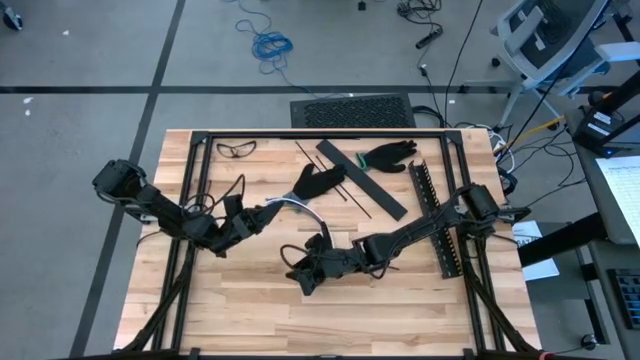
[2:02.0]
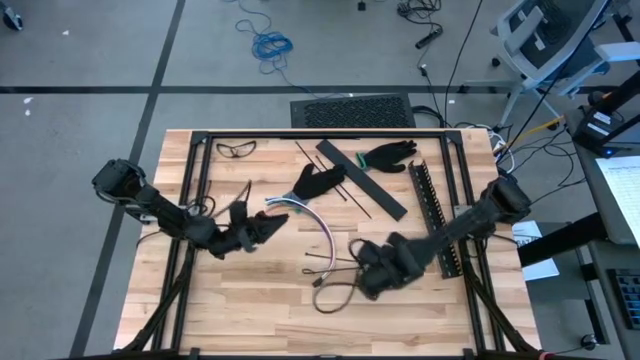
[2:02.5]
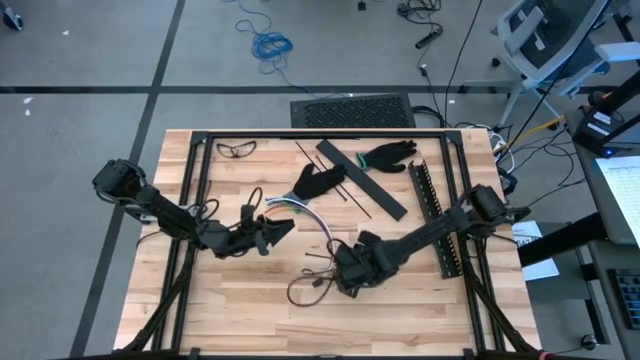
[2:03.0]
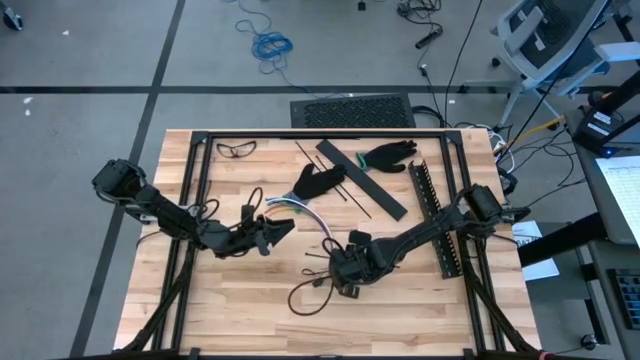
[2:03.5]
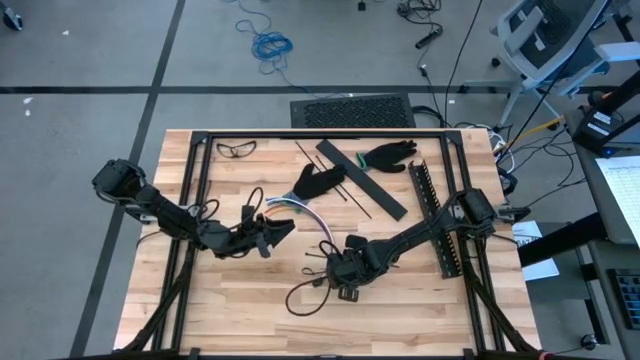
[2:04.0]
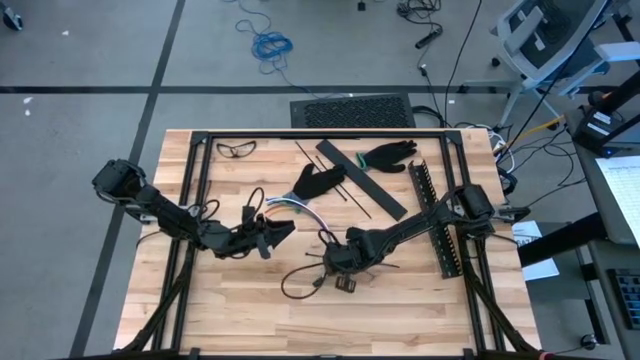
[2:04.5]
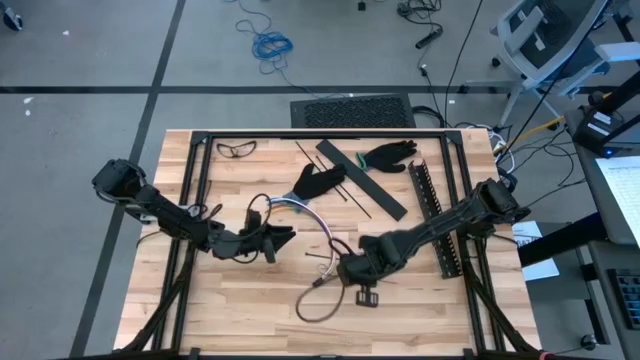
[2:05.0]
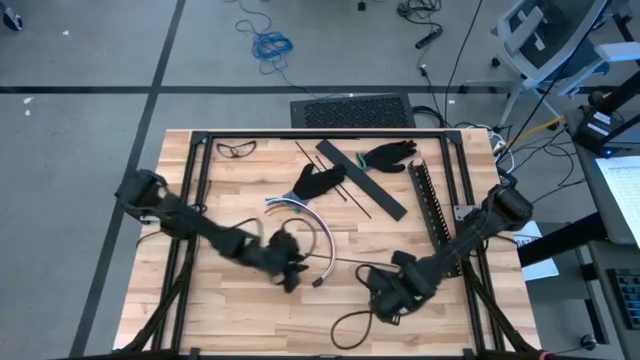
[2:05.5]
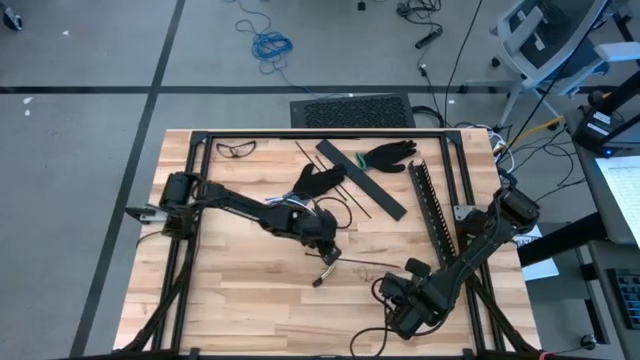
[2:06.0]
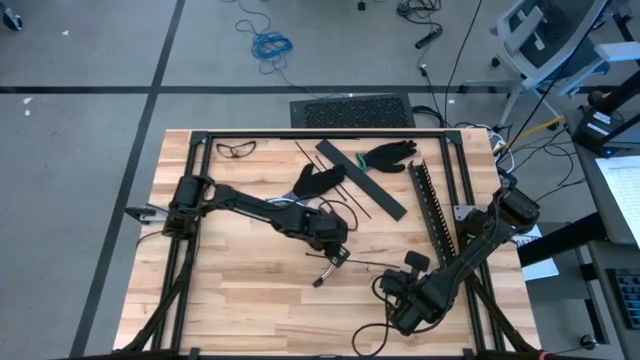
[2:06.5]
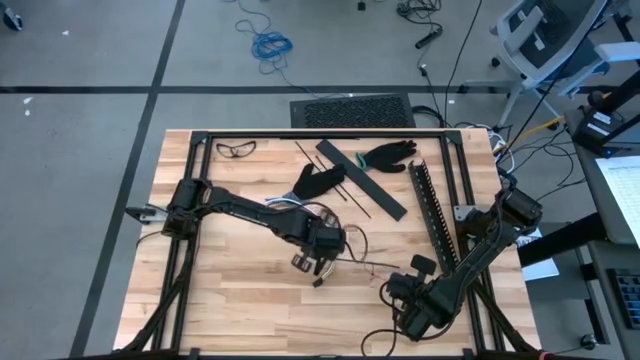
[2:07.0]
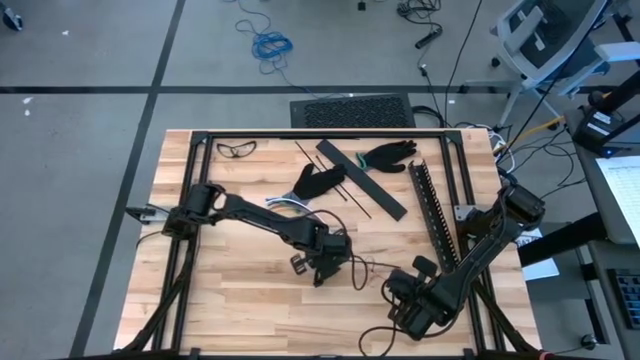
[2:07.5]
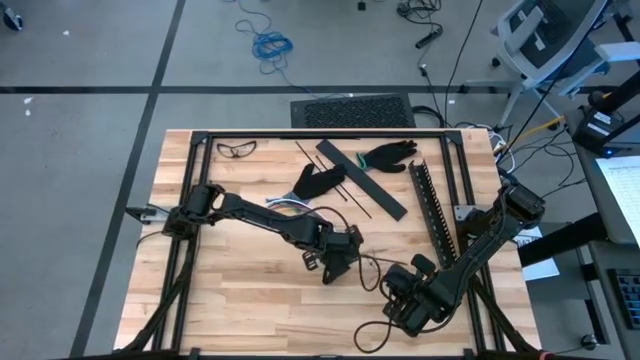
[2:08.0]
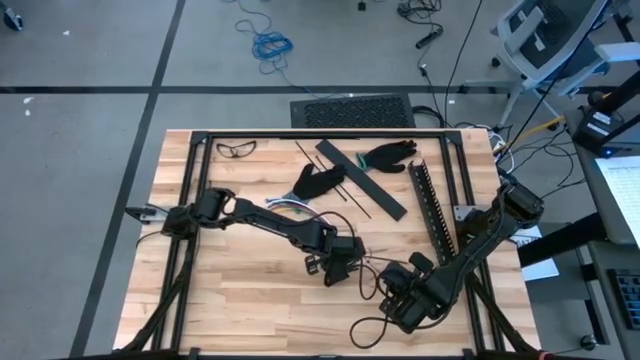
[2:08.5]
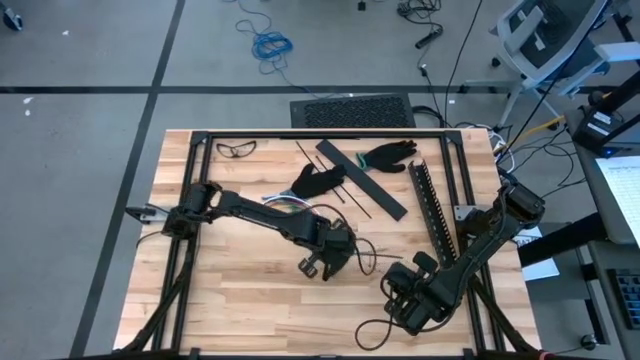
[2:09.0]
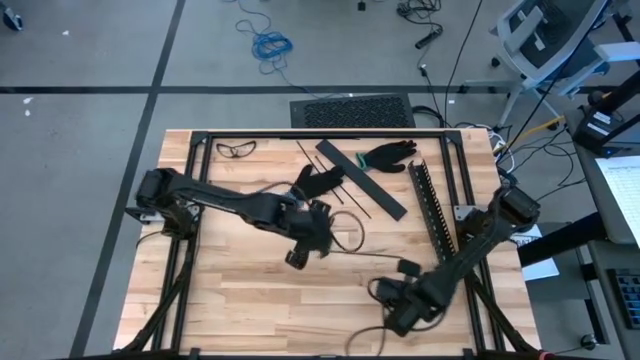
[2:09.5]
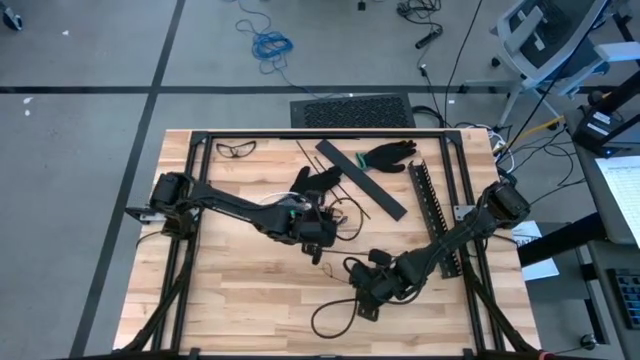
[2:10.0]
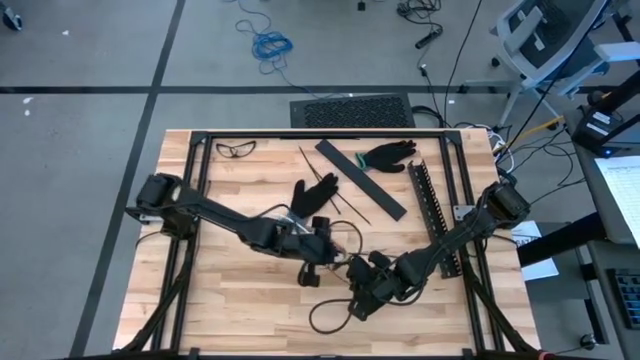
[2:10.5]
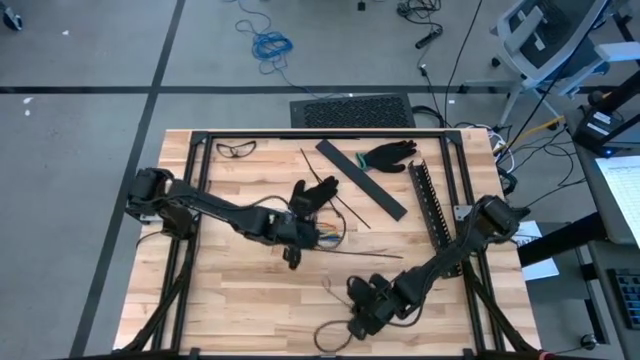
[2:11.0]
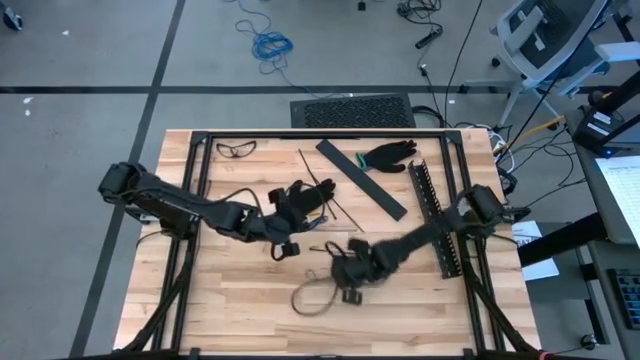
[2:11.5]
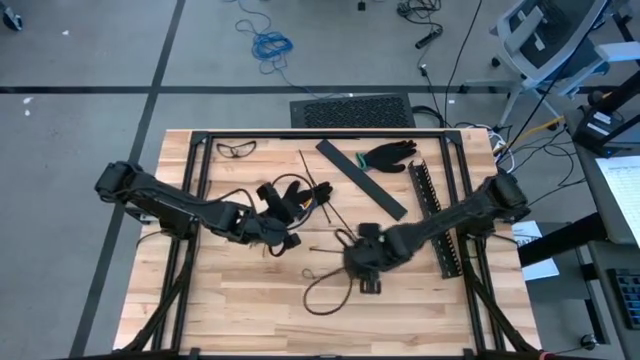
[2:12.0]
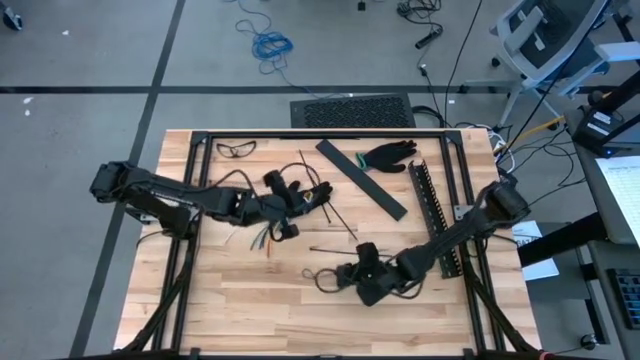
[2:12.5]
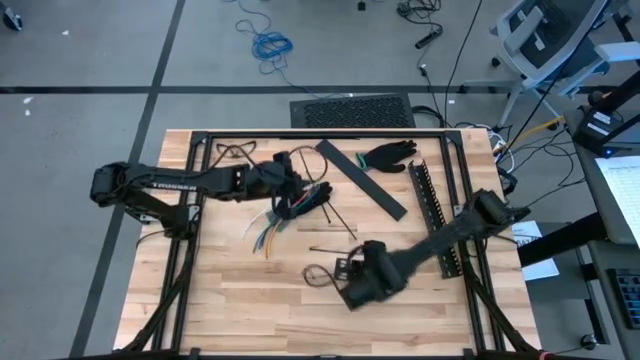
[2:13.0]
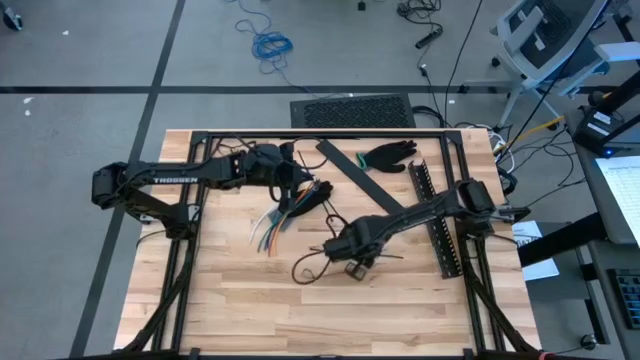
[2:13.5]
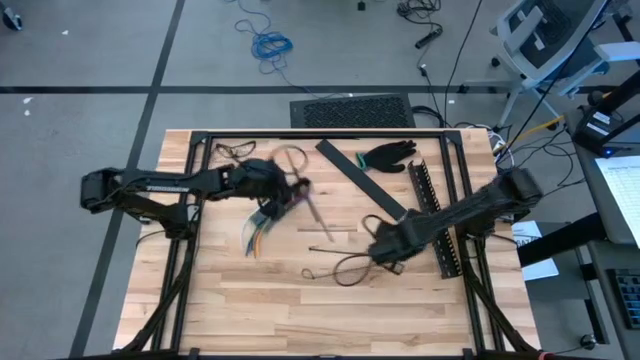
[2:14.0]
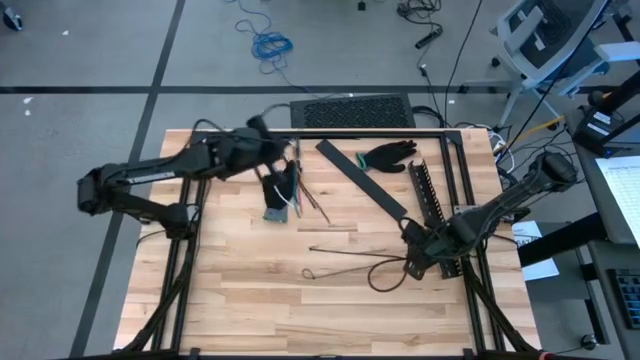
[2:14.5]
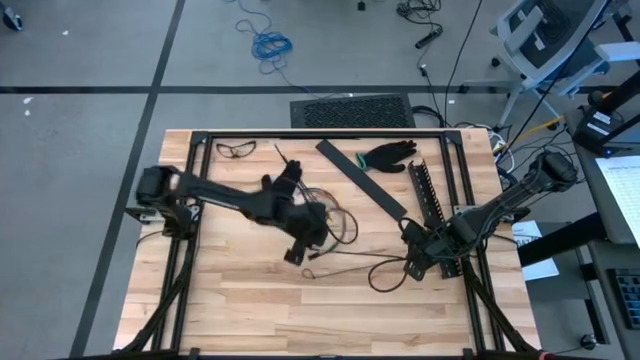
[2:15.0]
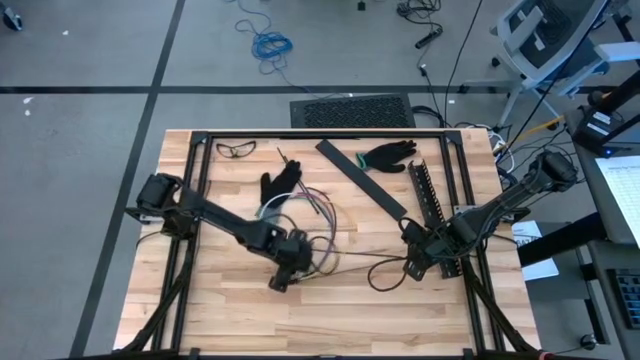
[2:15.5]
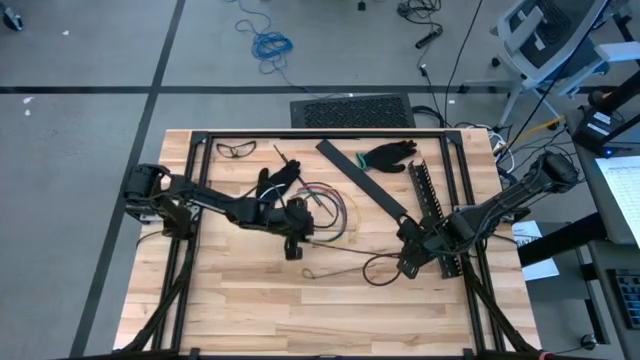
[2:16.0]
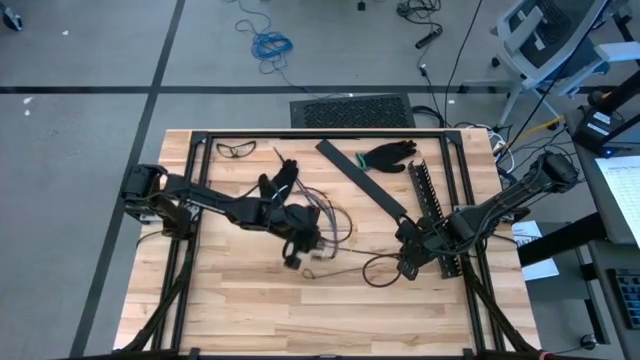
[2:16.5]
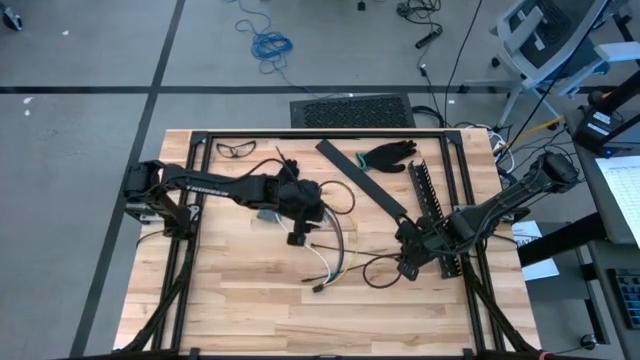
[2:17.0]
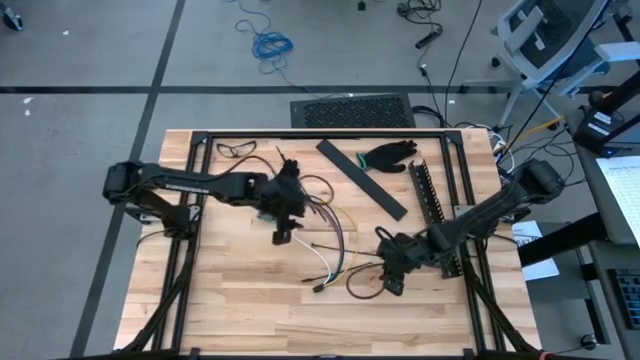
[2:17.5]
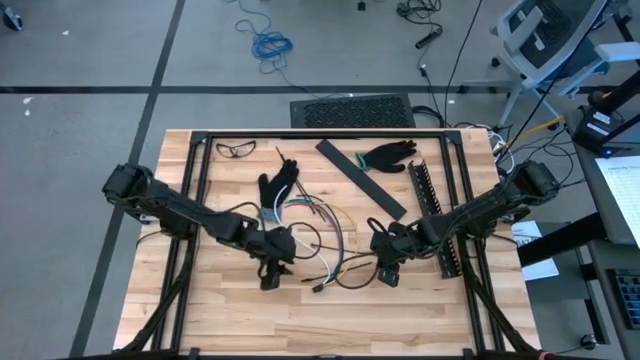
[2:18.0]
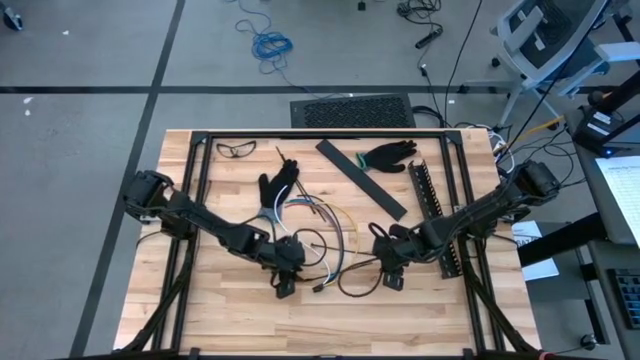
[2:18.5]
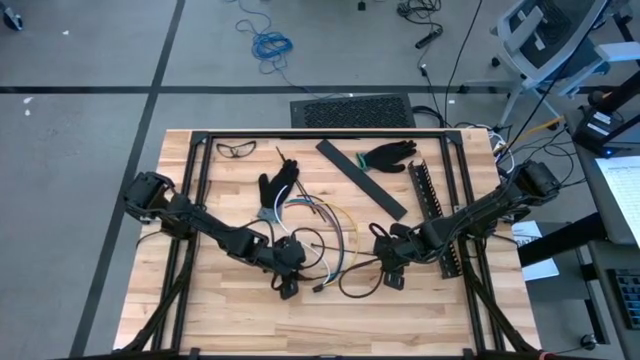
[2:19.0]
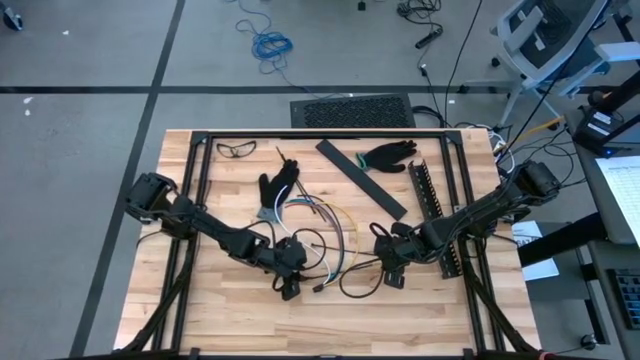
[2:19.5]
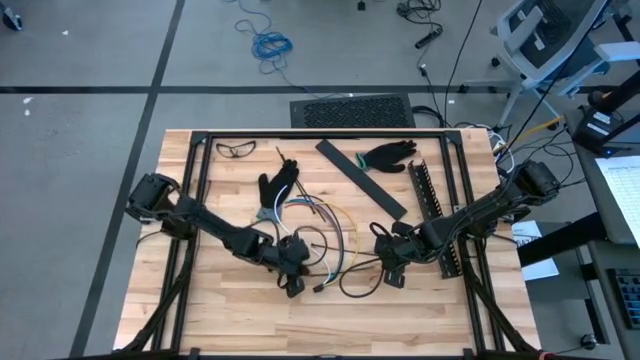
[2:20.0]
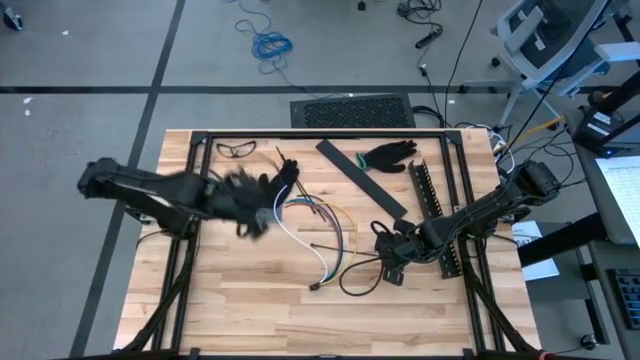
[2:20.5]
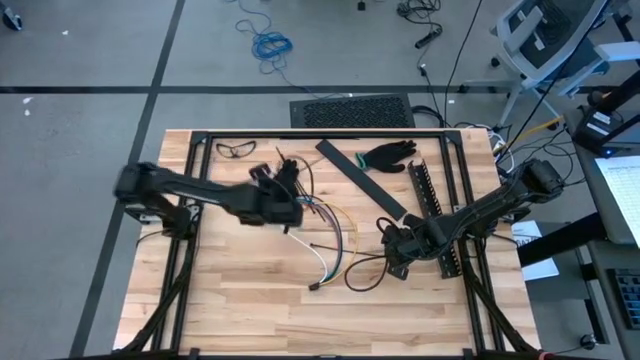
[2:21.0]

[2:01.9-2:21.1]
Task: Ziptie cables
Wrap the black zip tie on the cable

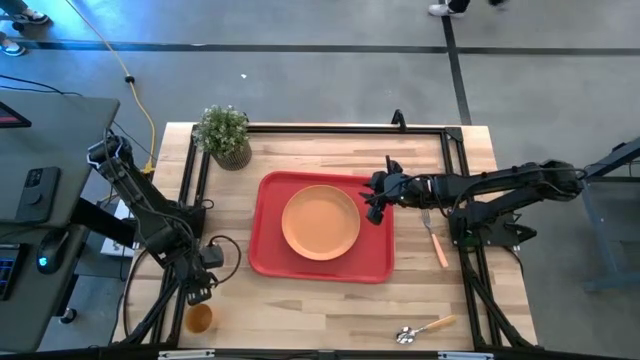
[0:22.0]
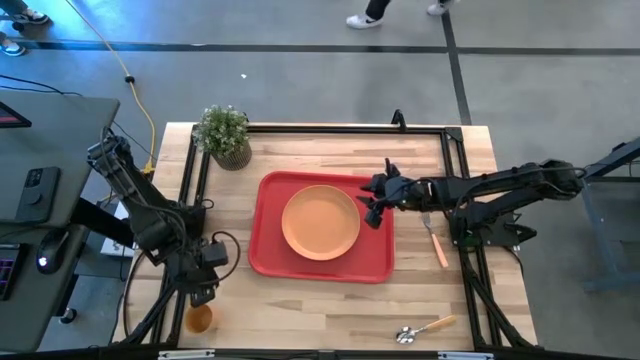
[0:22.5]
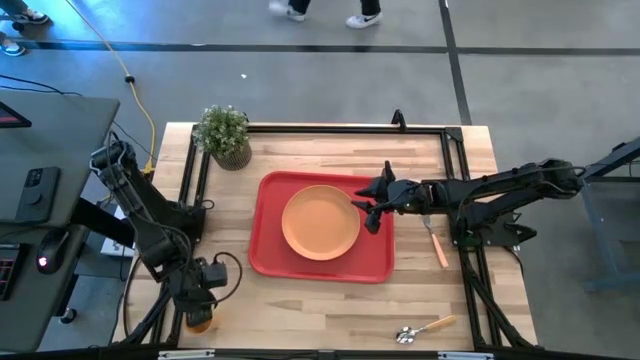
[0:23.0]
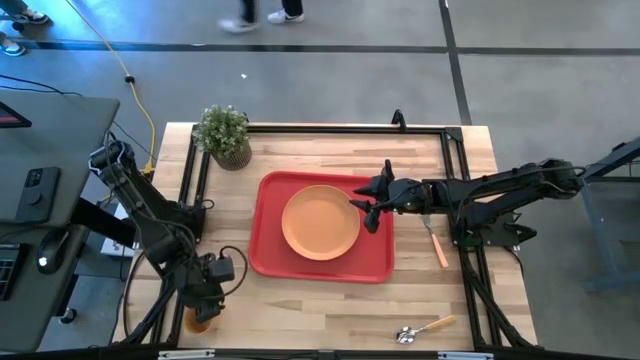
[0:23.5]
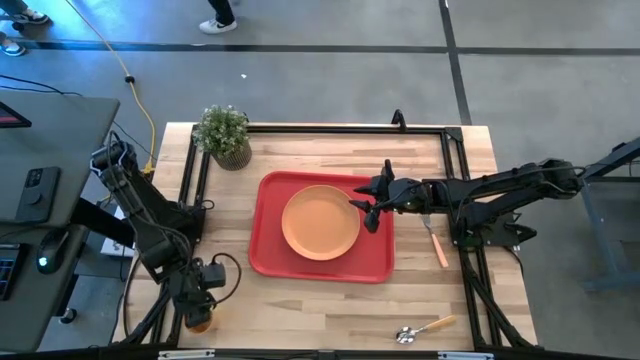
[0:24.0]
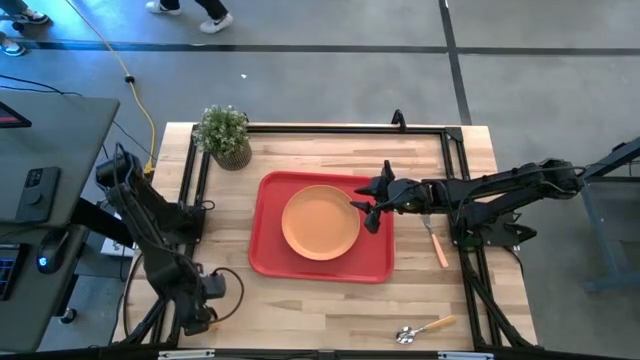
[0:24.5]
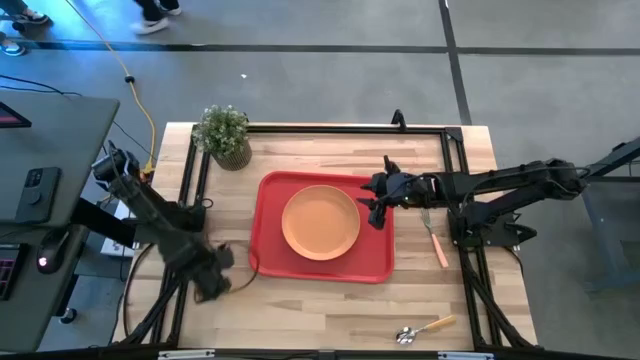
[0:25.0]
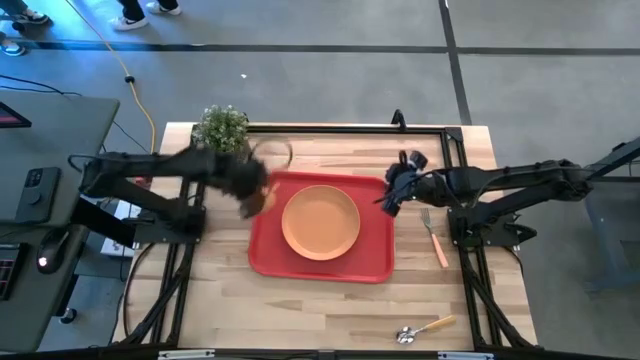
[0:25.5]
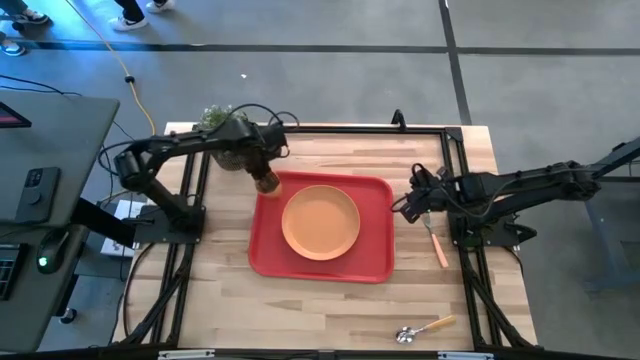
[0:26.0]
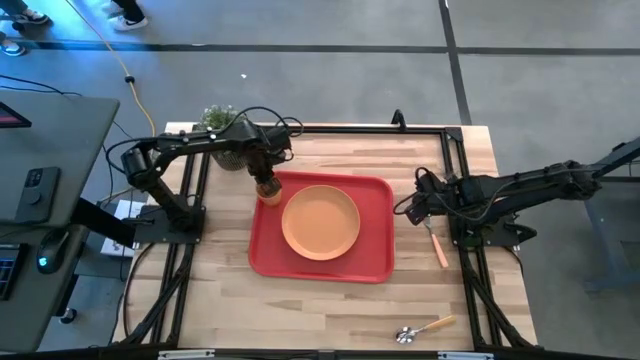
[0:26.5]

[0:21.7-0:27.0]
Task: Pick and place plate/cup/fork/spoon on tray
Put the orange cup on the red table tray to the top left of the orange plate
